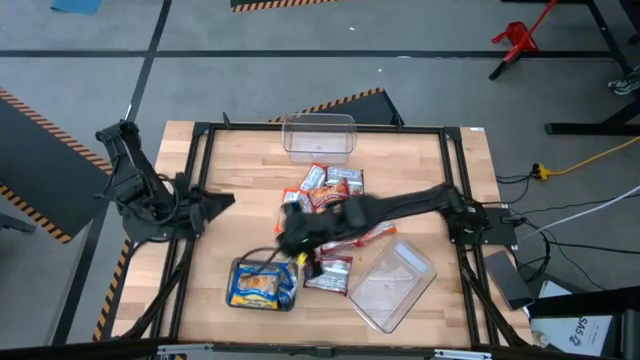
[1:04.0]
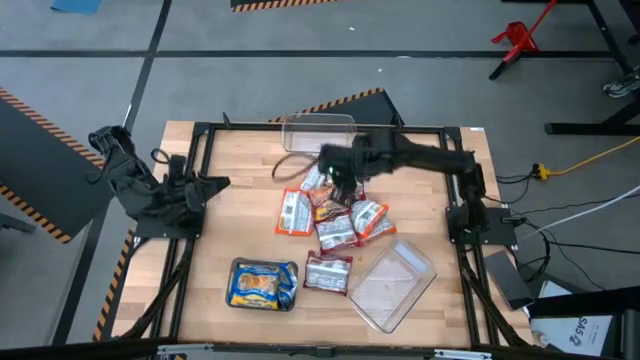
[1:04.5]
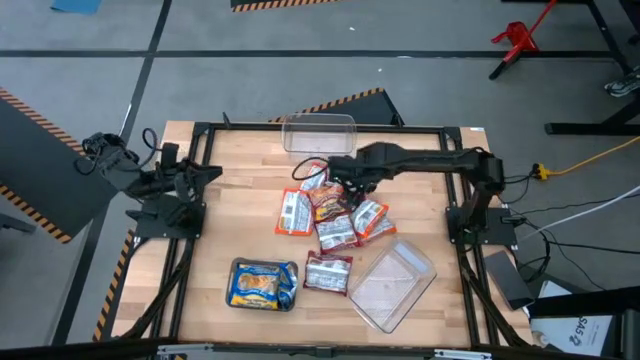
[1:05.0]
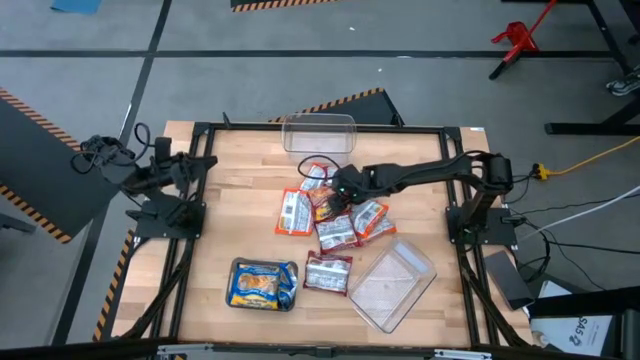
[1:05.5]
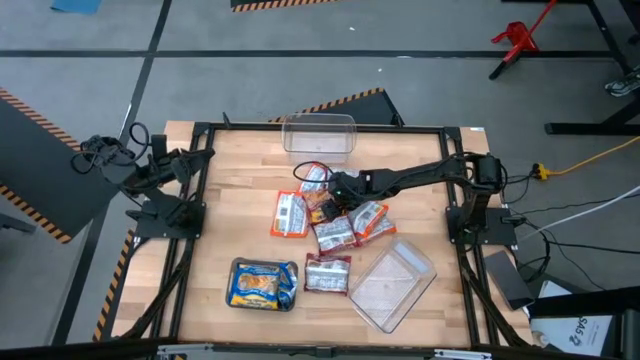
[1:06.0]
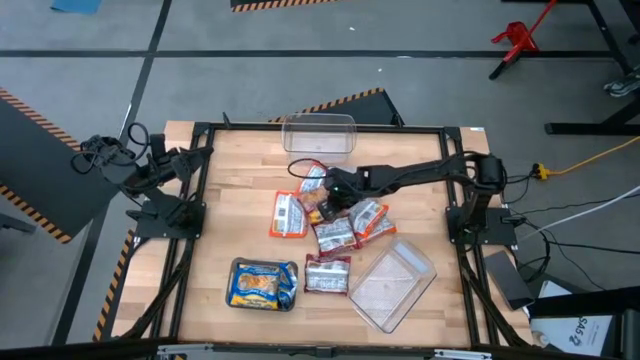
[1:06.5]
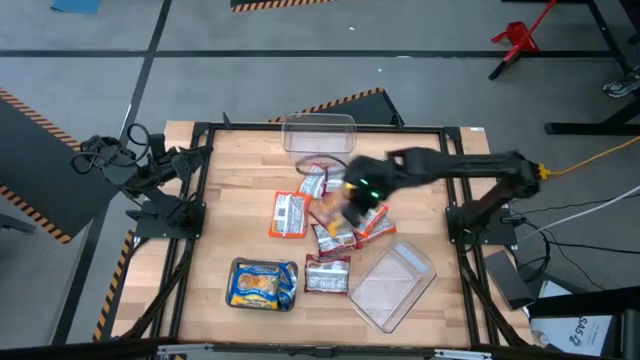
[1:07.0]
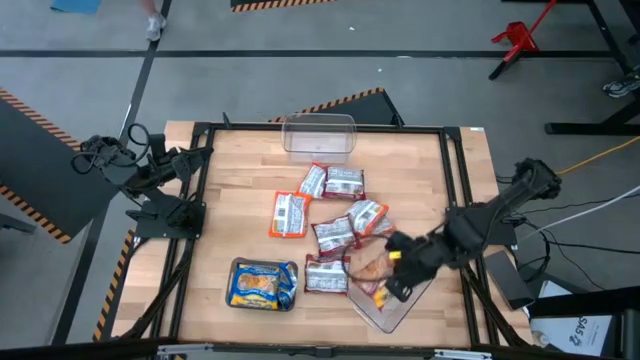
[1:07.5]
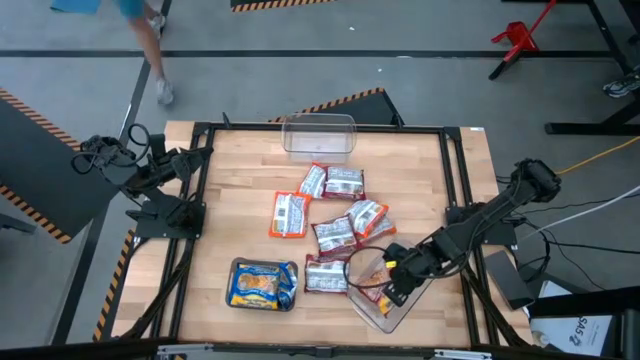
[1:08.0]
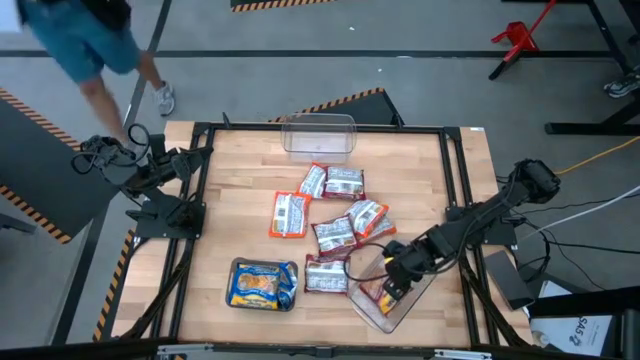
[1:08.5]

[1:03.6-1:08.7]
Task: Sort Maruchan noodles
Put the red noodle pack into the bottom transparent bin

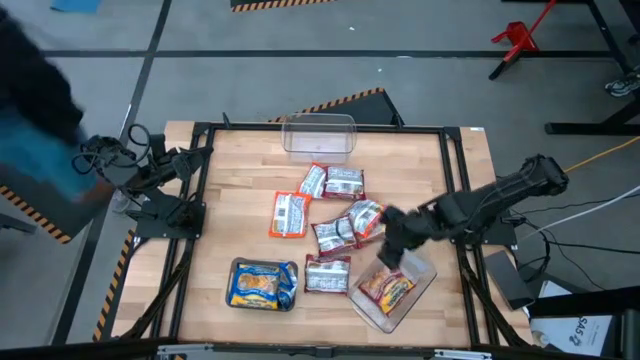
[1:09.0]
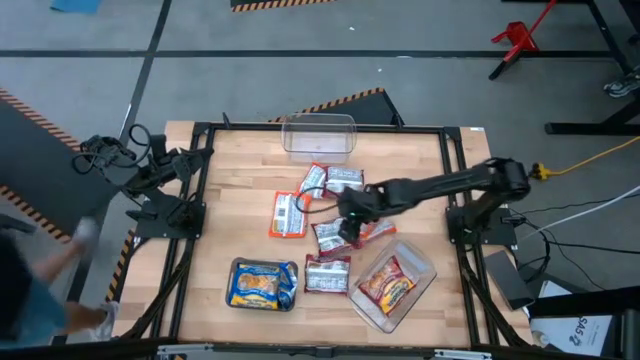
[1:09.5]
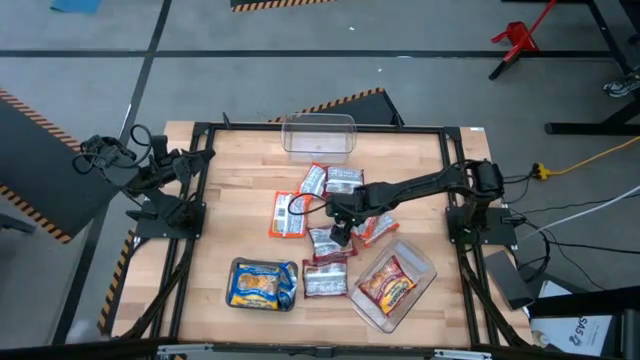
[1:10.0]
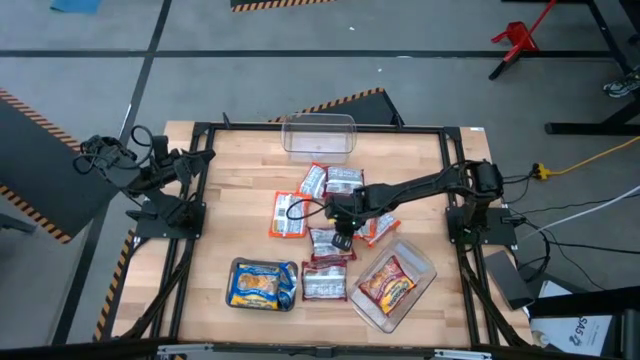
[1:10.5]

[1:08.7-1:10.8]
Put the red noodle pack into the bottom transparent bin

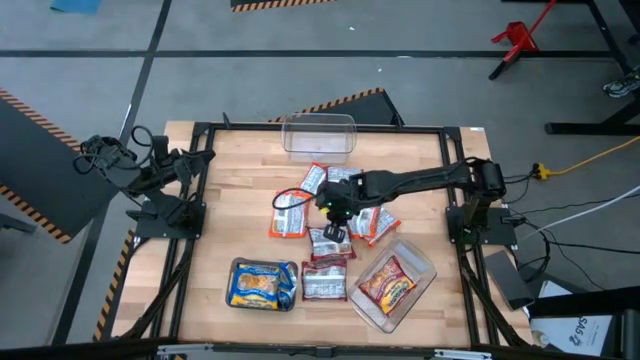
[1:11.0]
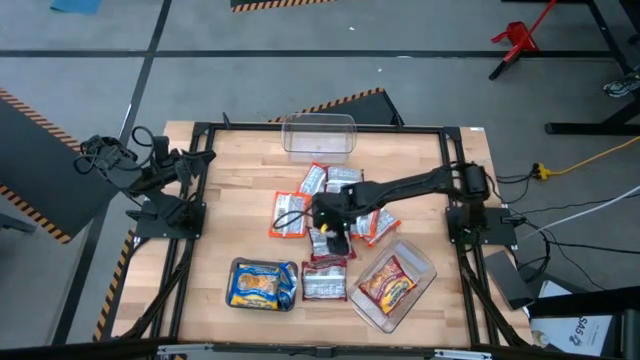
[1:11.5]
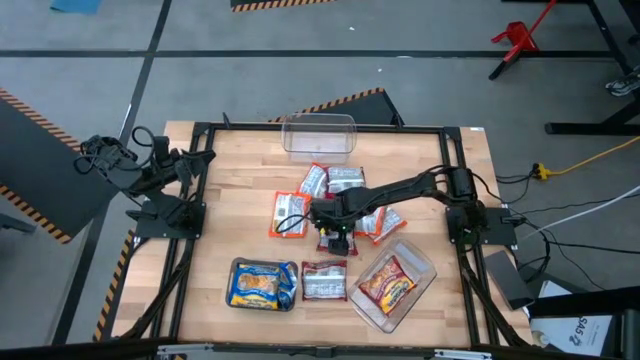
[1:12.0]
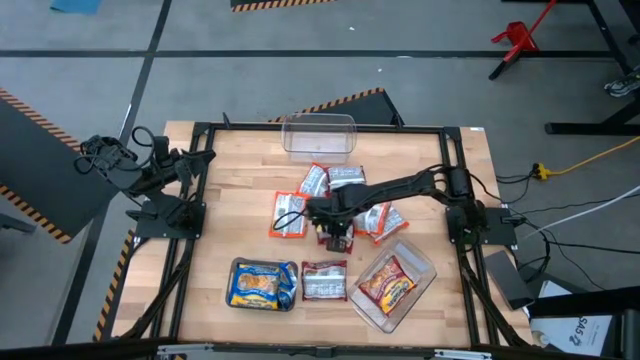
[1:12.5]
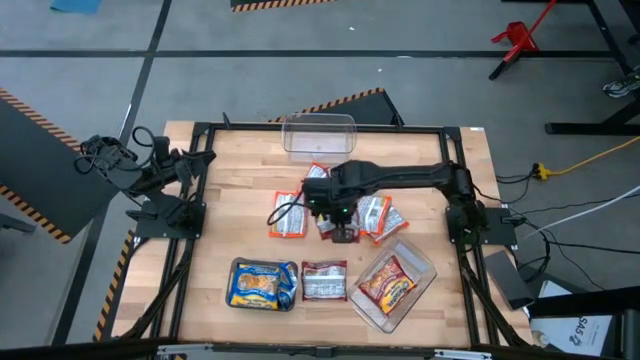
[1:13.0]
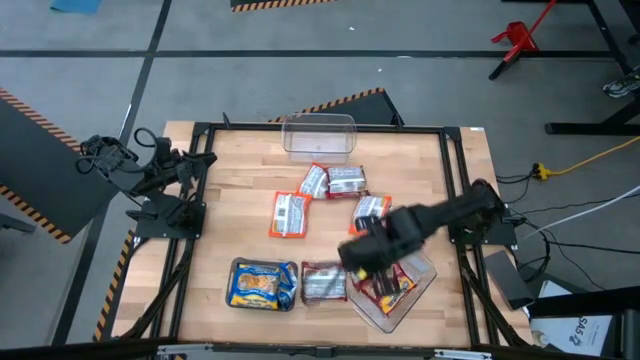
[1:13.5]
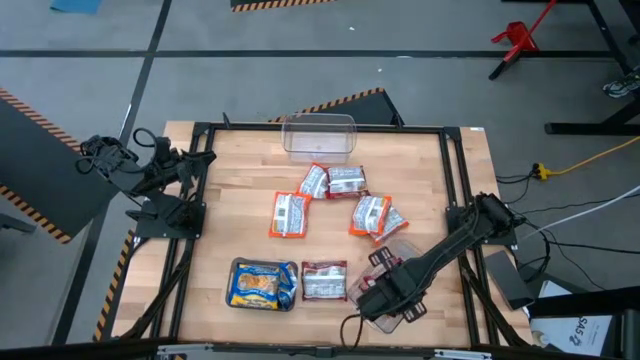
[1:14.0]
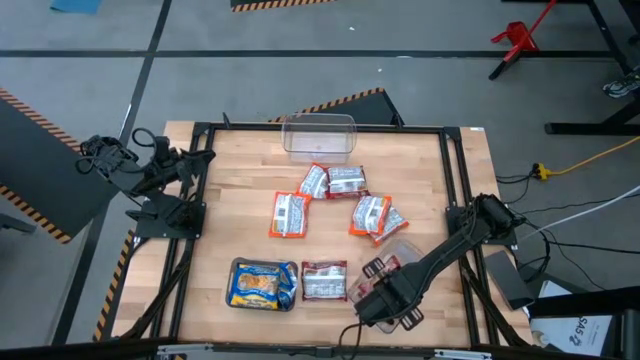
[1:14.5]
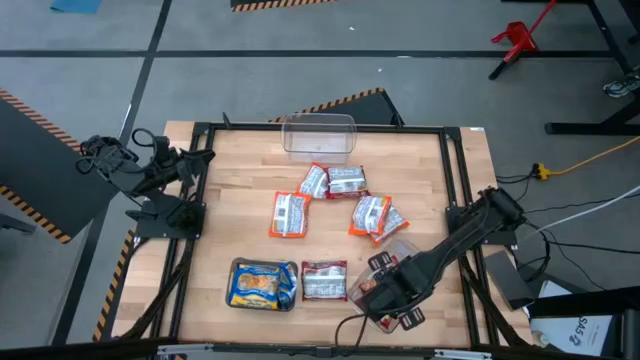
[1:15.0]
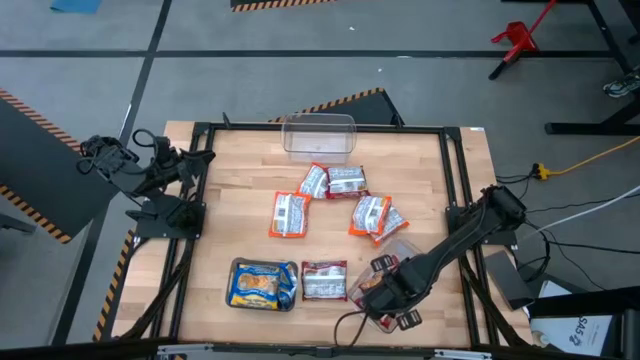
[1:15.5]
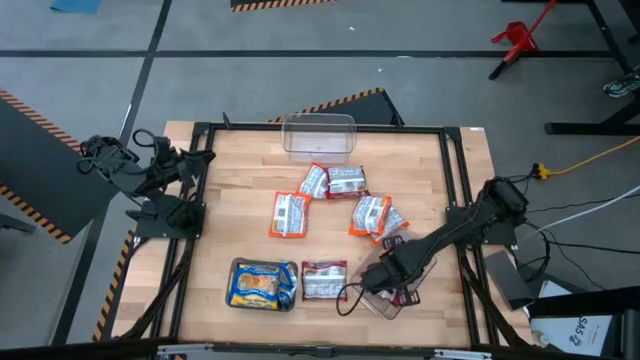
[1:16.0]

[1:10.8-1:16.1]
Put the red noodle into the bottom transparent bin

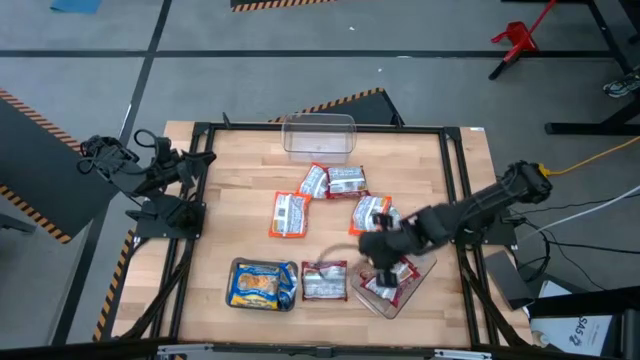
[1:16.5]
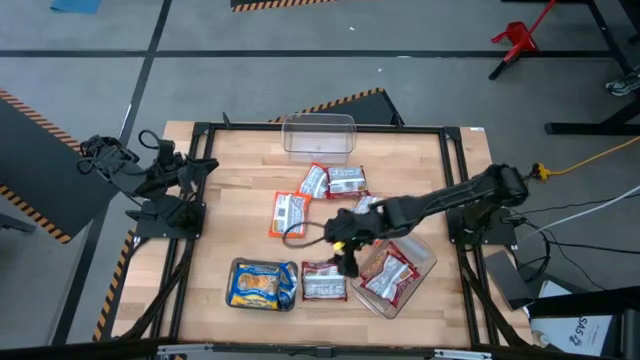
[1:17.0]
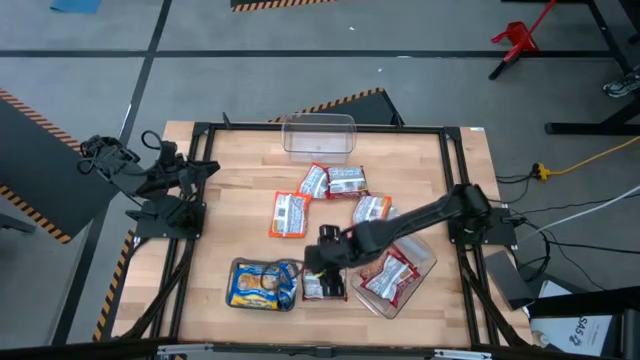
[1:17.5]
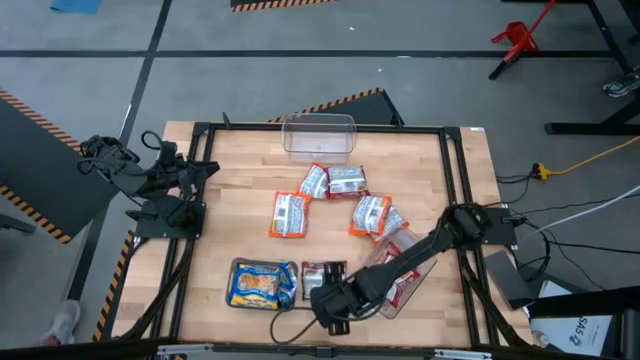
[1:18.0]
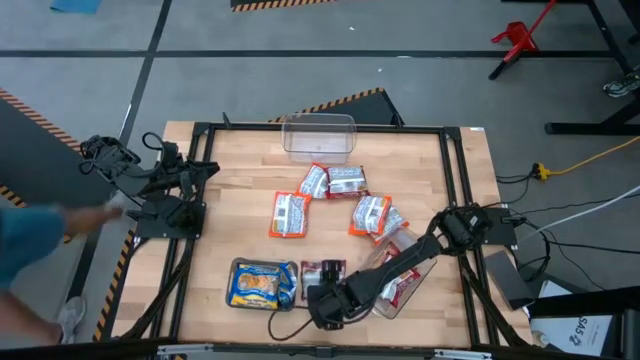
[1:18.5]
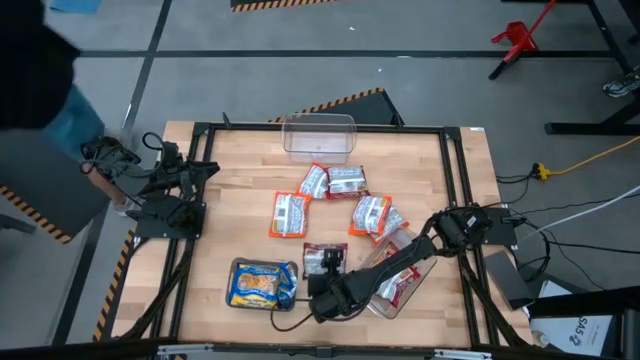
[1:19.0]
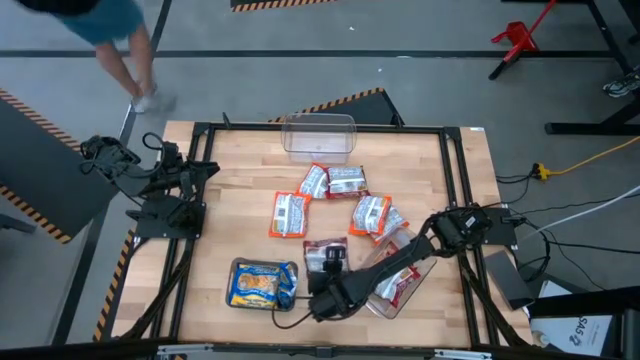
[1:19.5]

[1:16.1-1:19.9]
Put the red noodle pack into the bottom transparent bin

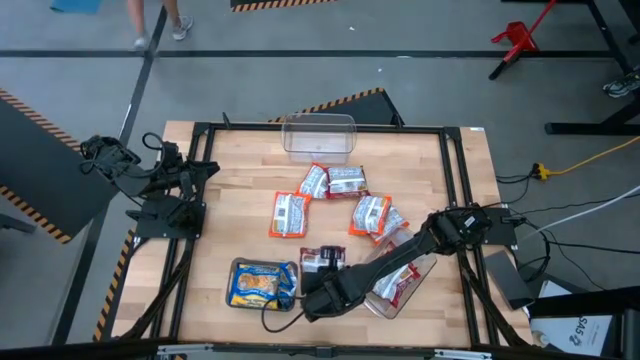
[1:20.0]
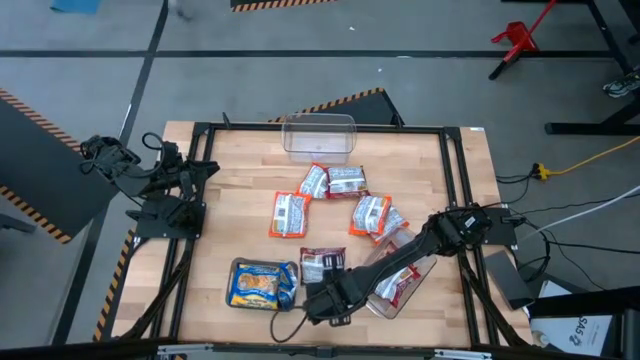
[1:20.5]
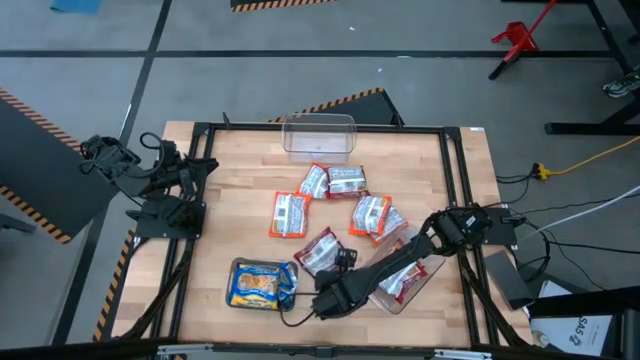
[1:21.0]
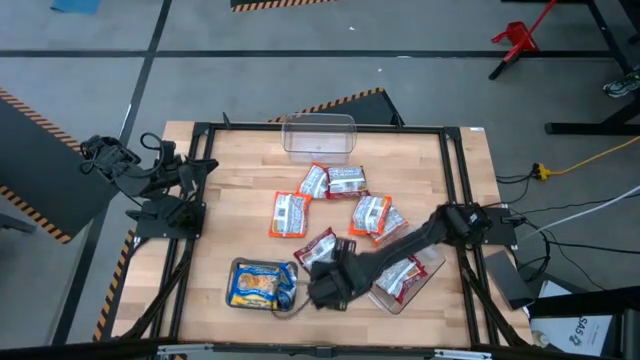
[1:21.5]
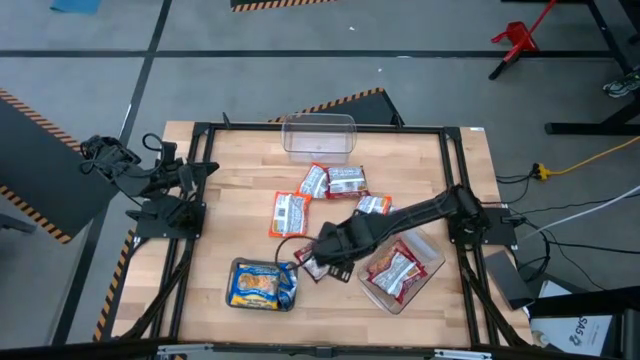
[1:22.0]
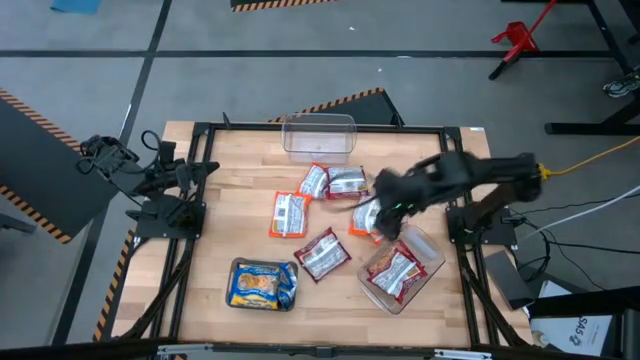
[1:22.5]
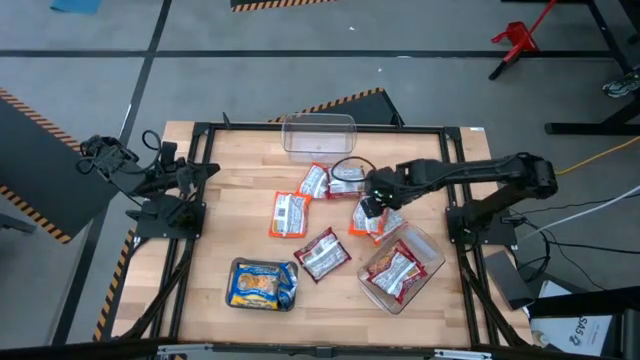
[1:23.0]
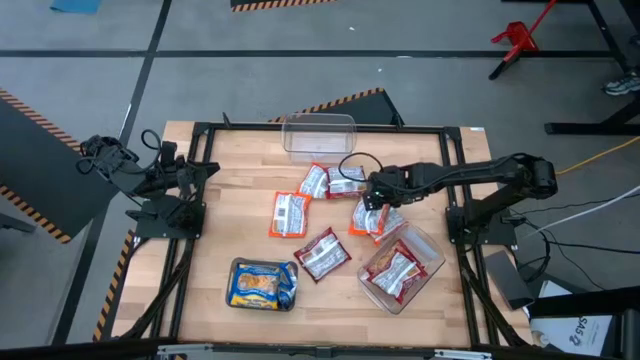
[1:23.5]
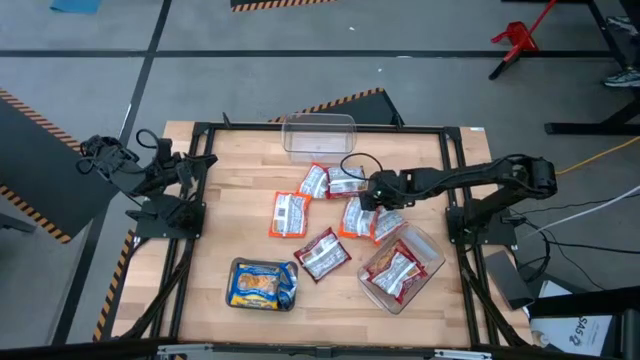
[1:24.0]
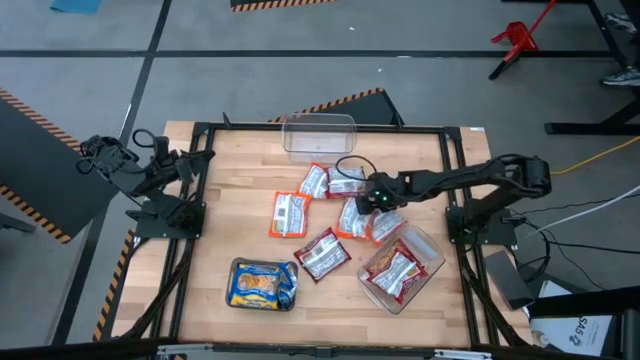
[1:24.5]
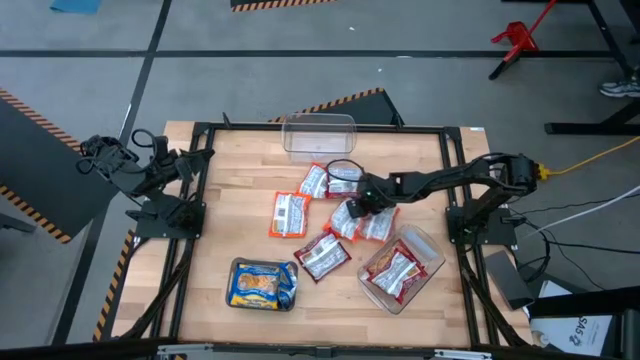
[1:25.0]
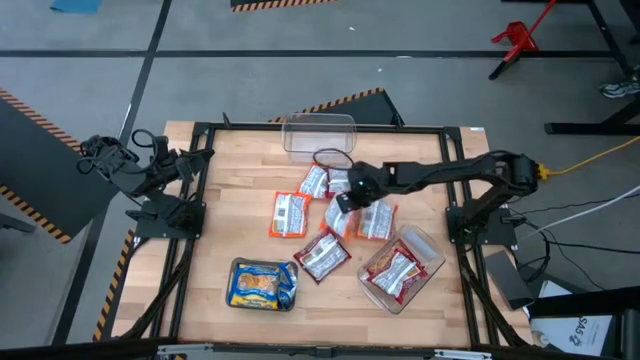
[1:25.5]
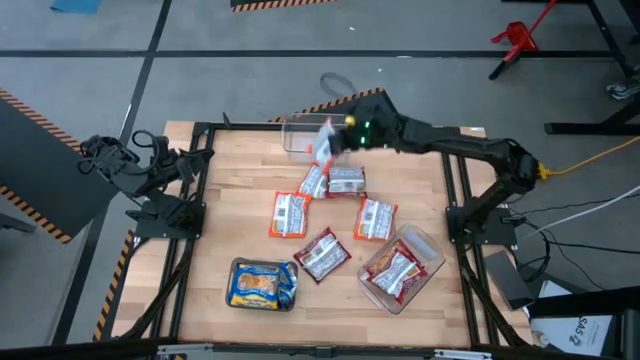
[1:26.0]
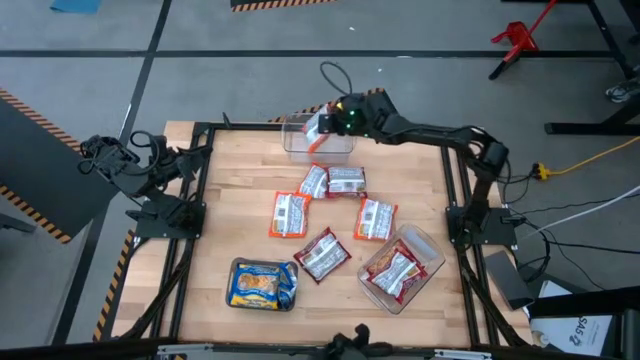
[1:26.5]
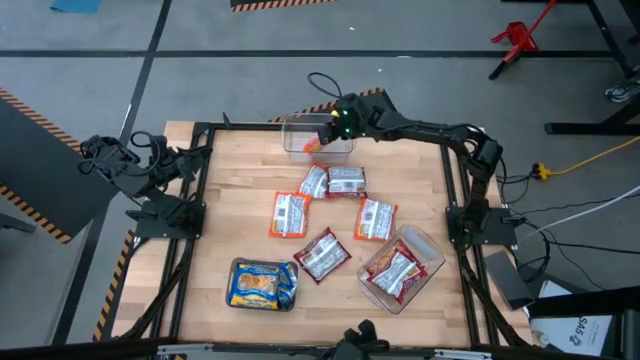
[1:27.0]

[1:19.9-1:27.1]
Put the orange noodle pack into the top transparent bin
